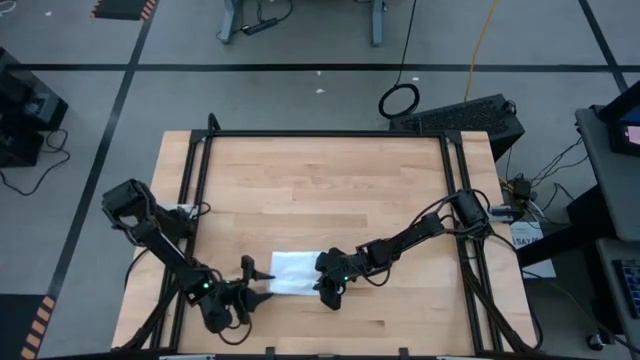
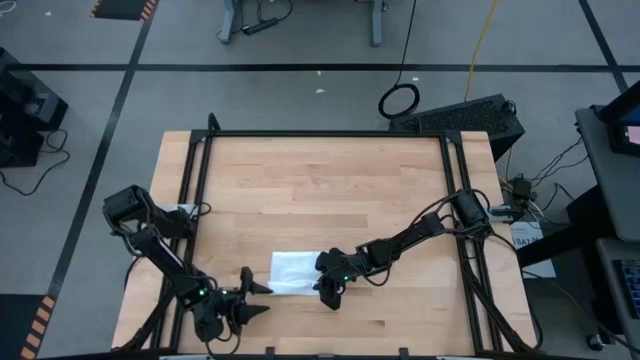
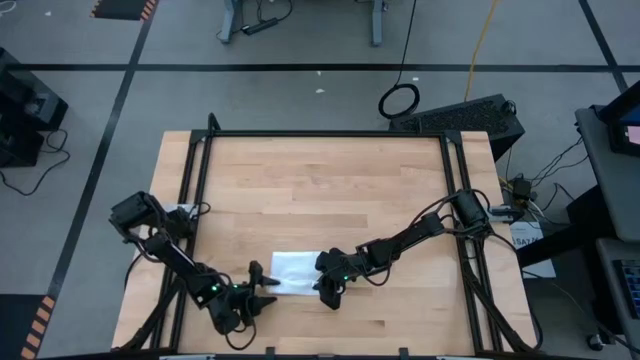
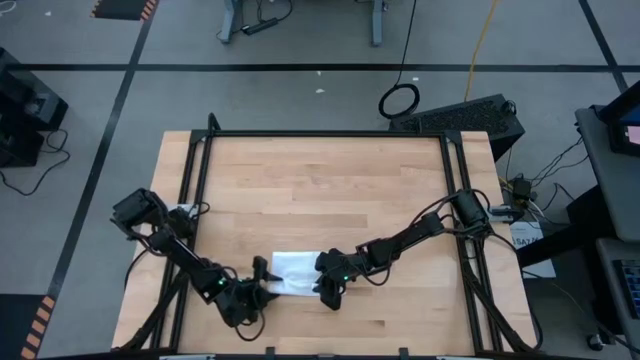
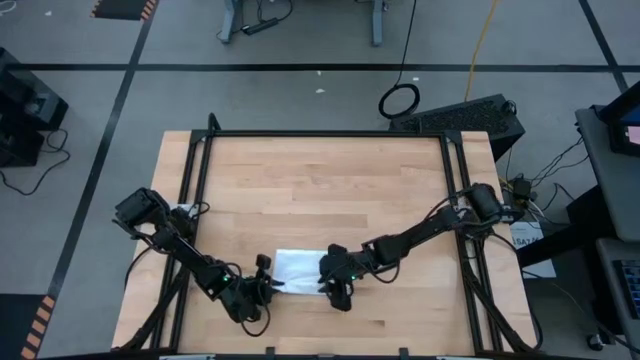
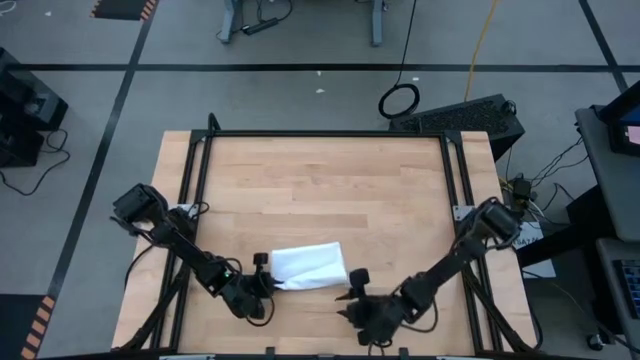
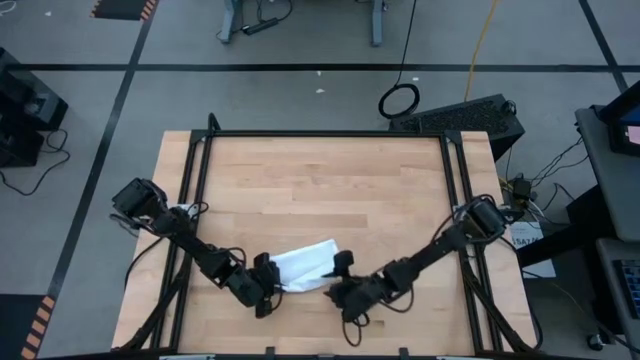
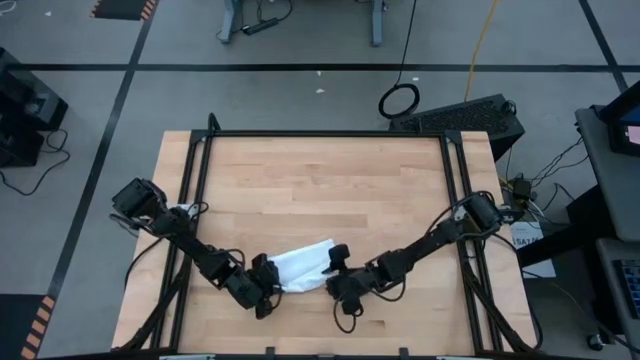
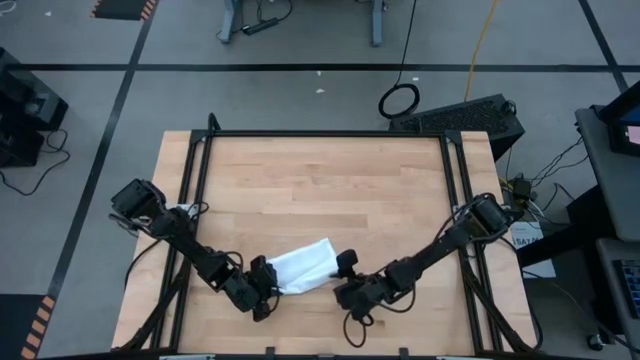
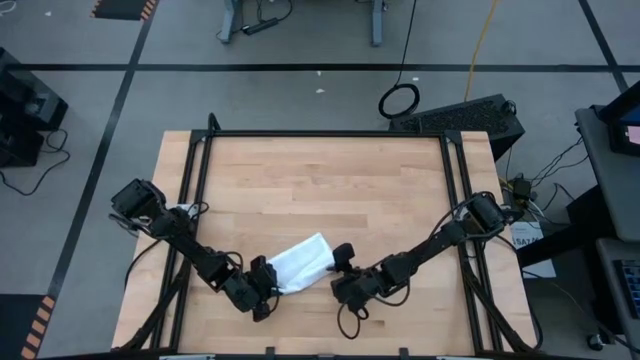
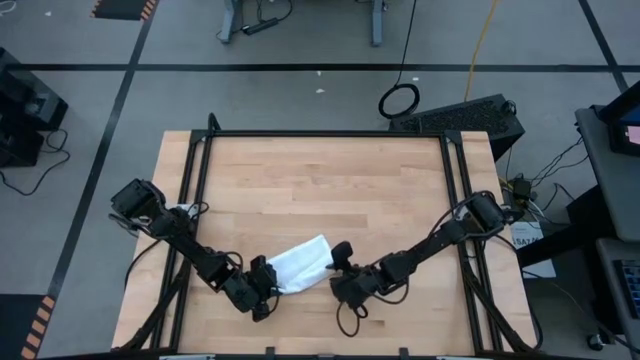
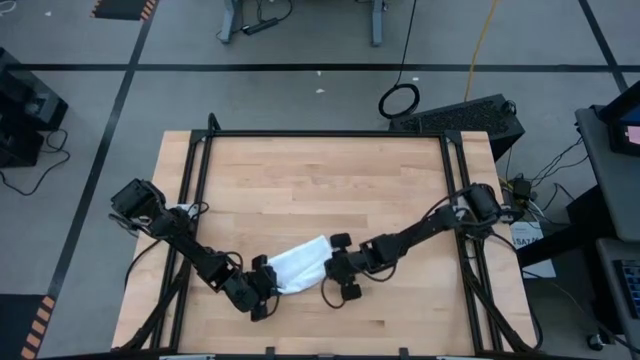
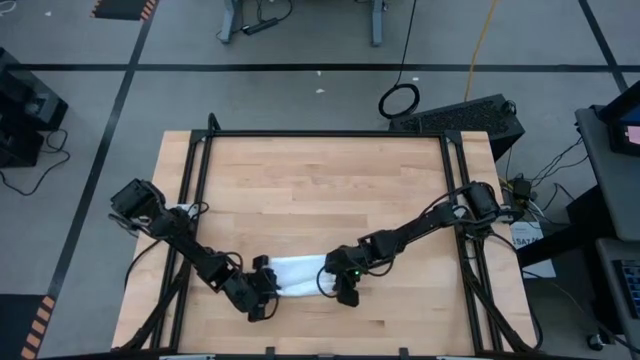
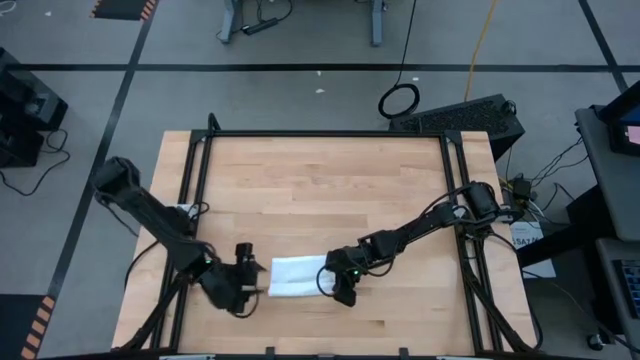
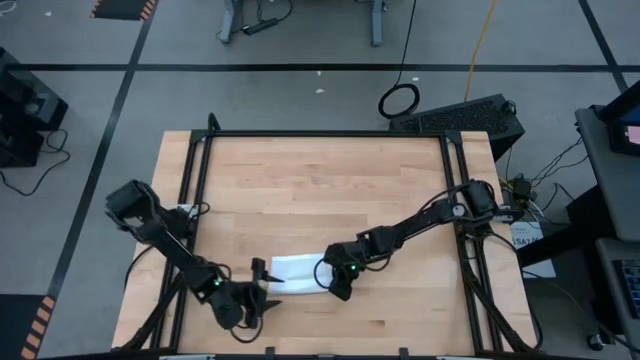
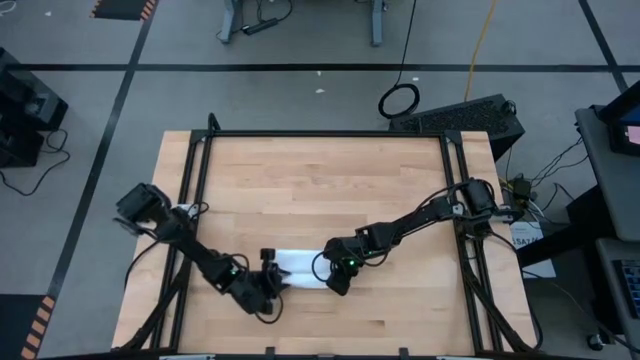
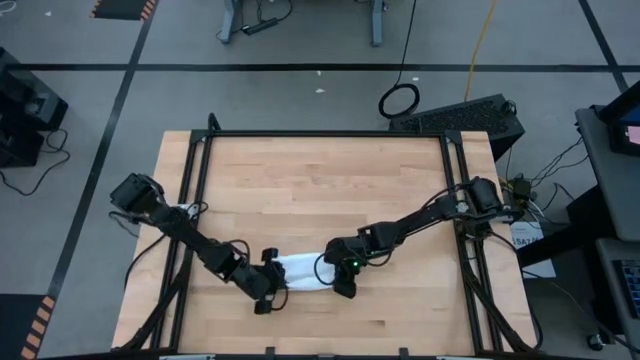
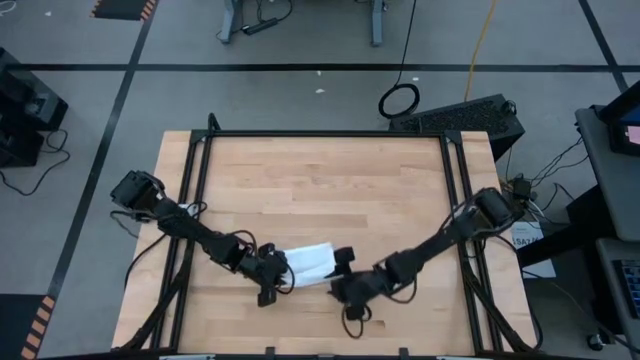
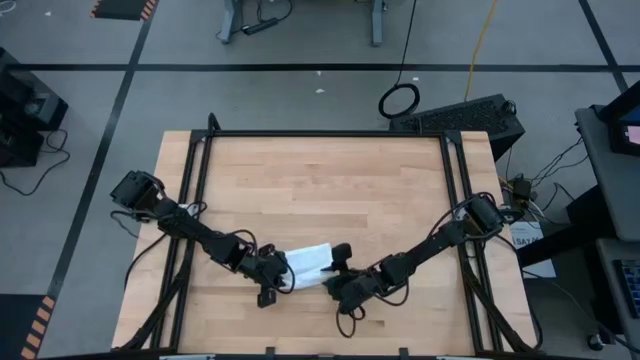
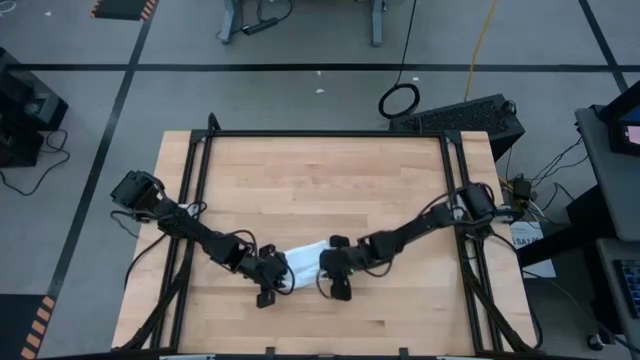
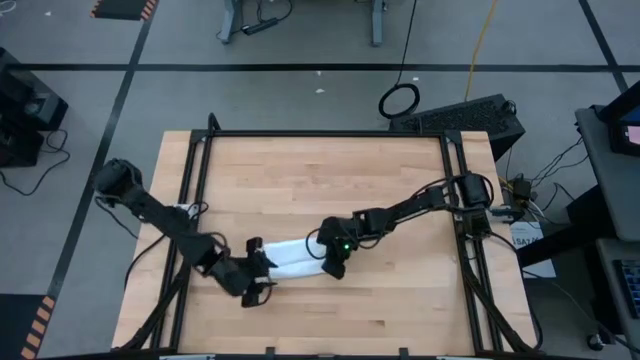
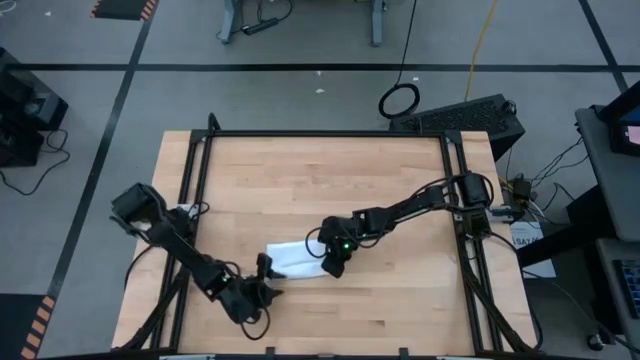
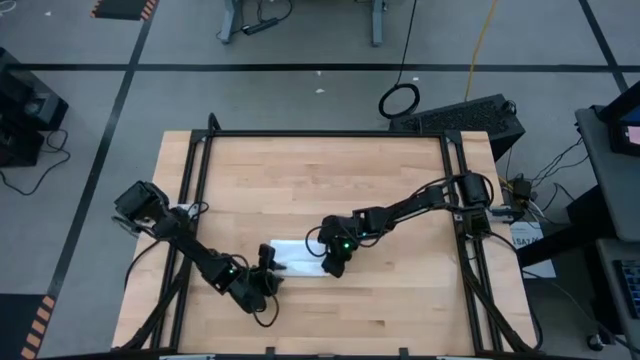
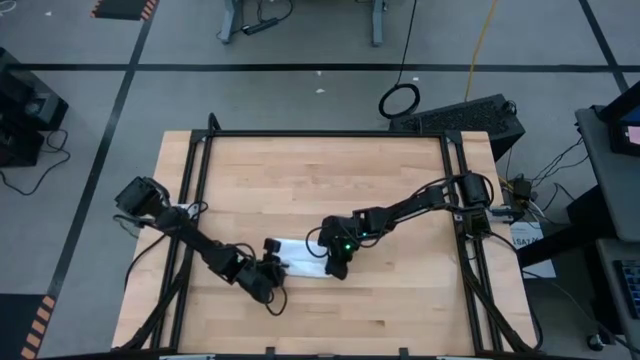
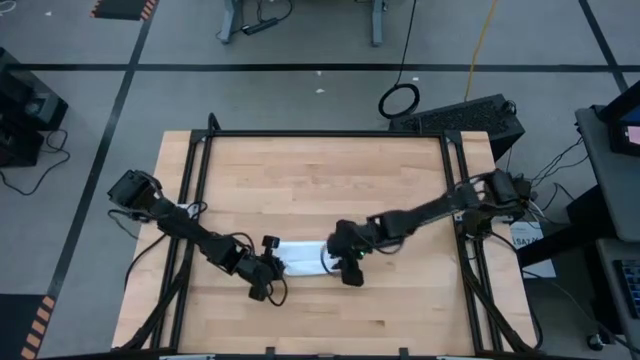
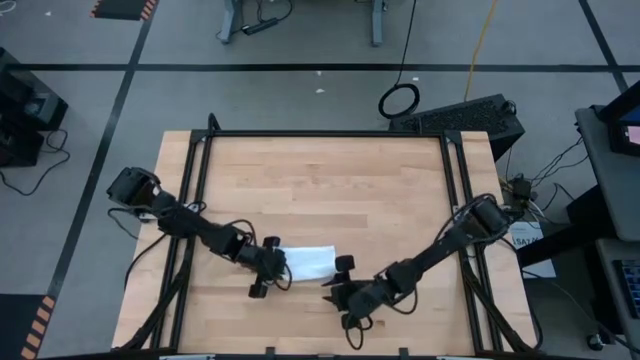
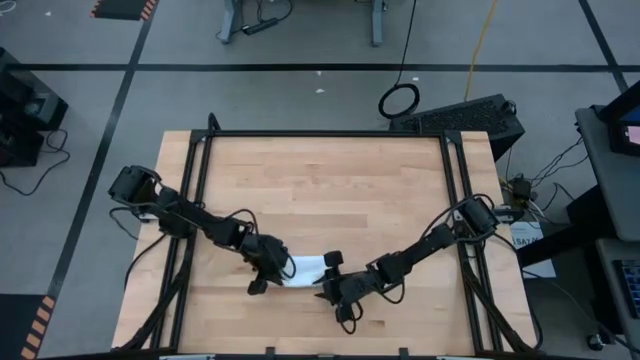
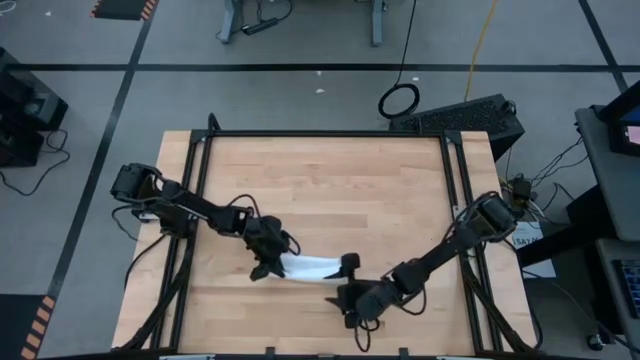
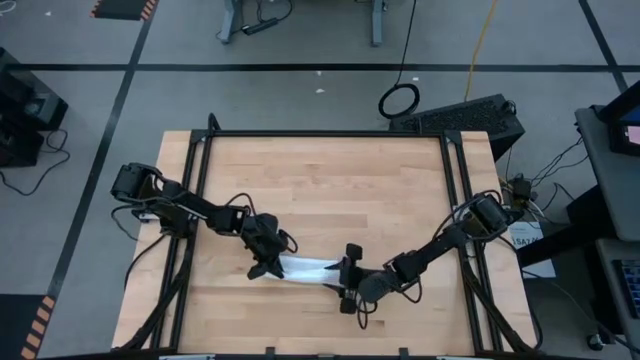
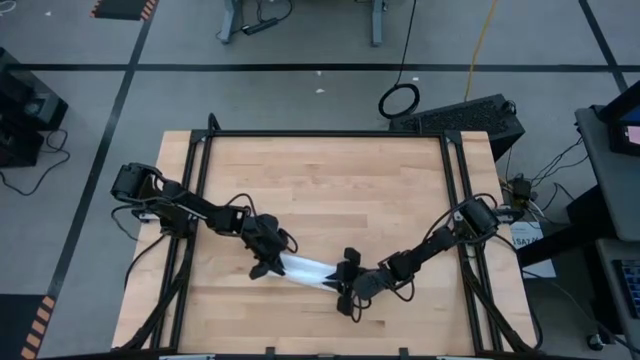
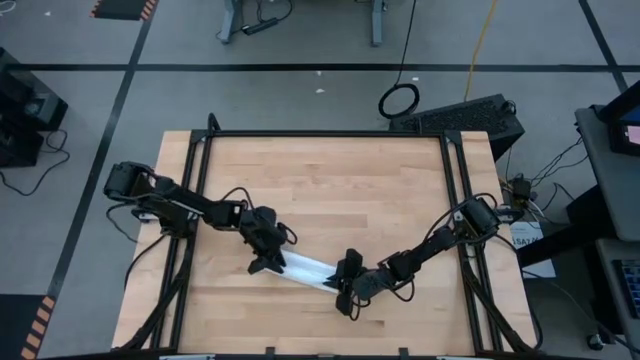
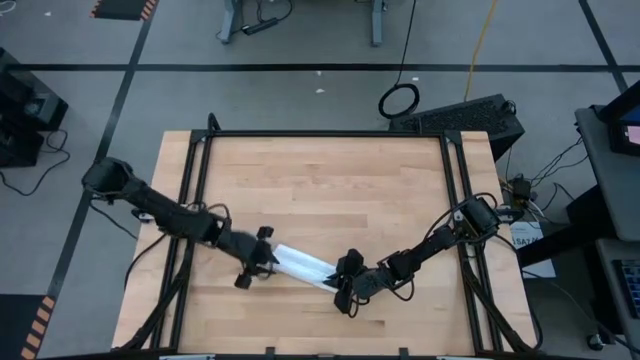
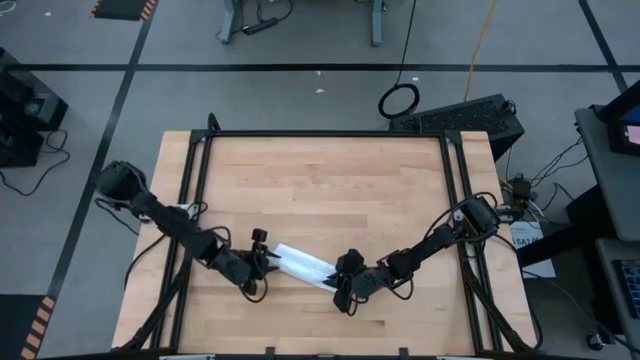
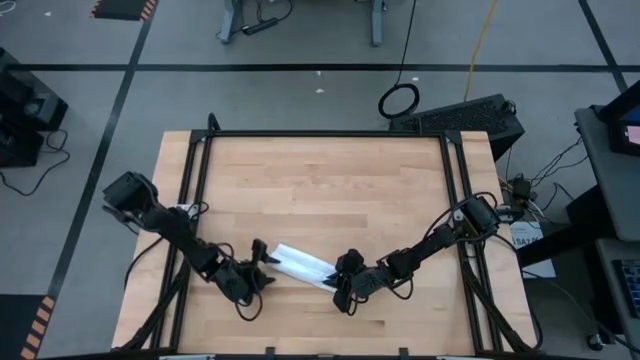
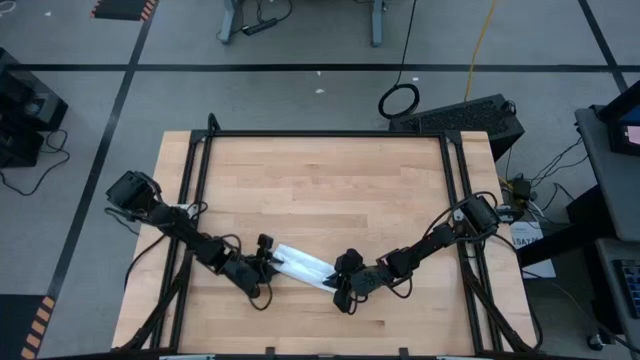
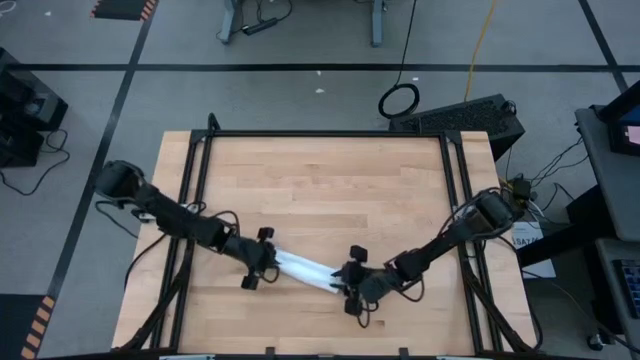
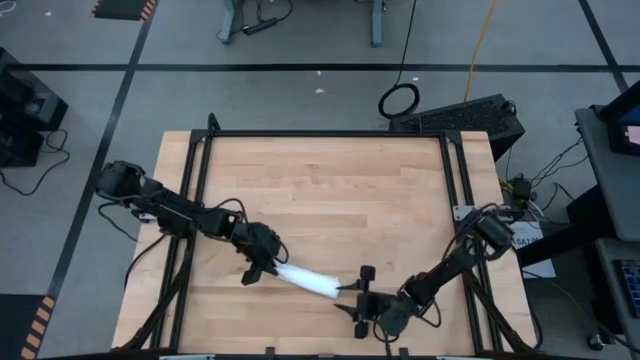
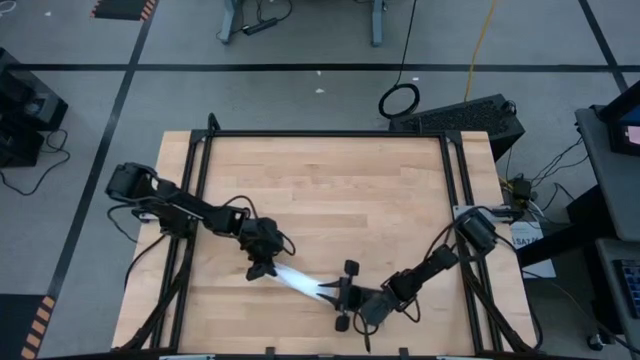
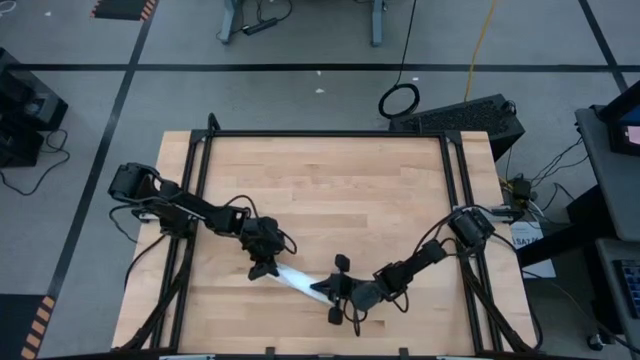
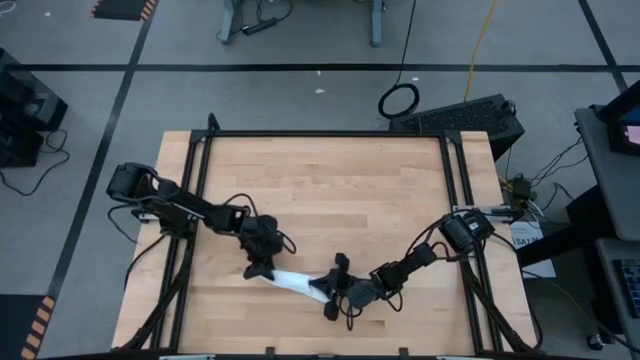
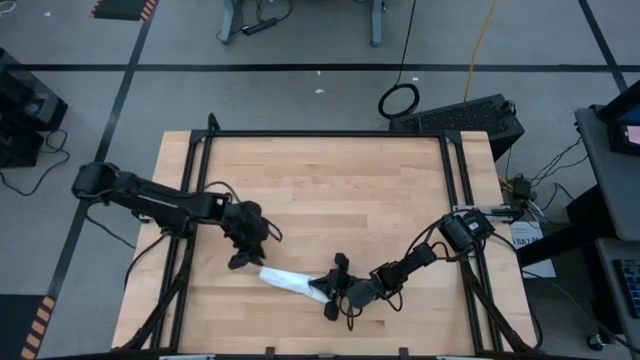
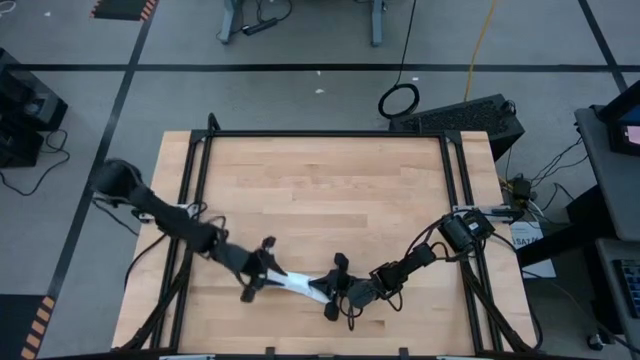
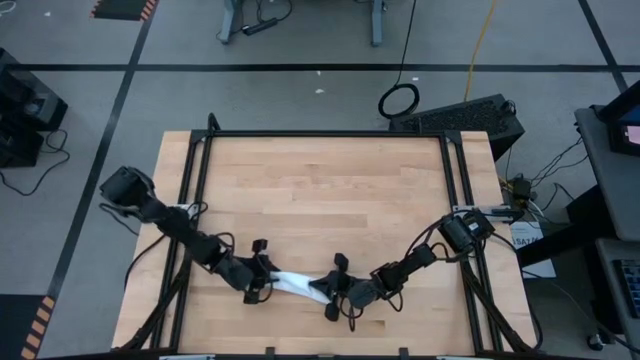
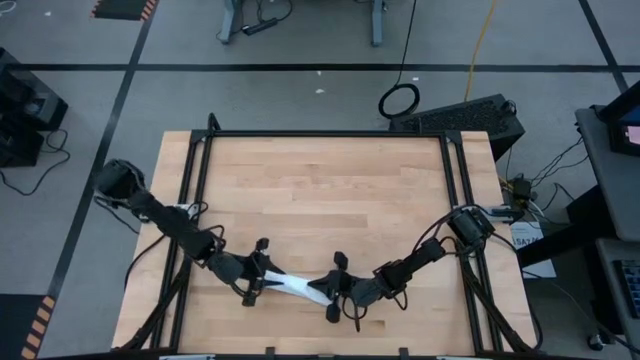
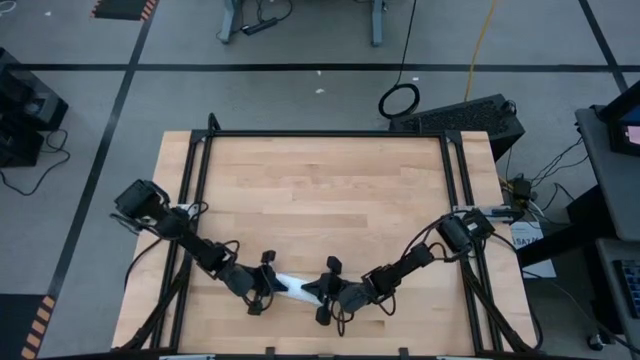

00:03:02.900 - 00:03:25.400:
Task: Roll towel
Roll the white towel
